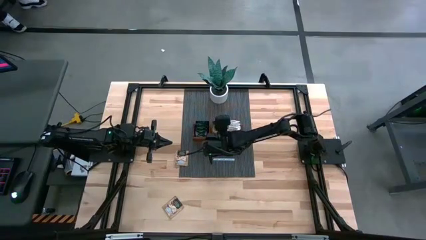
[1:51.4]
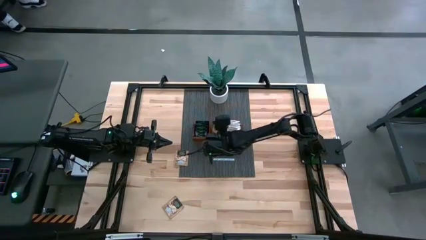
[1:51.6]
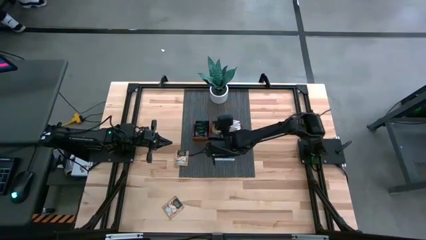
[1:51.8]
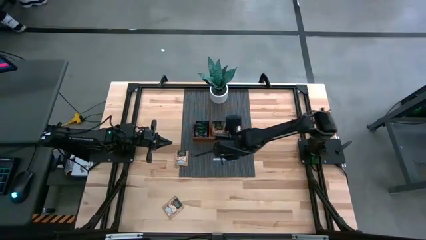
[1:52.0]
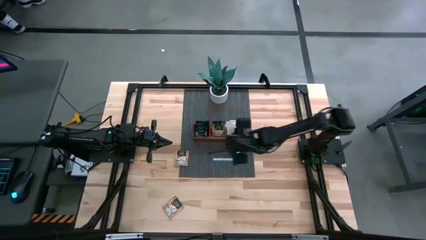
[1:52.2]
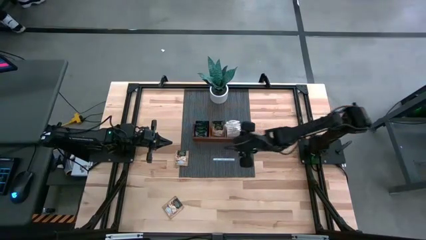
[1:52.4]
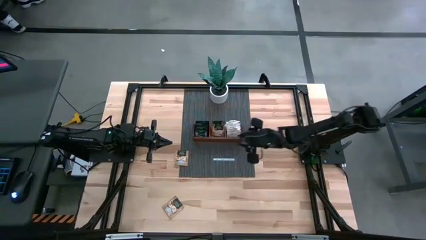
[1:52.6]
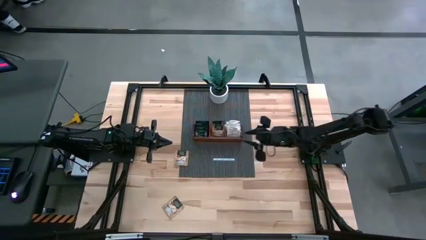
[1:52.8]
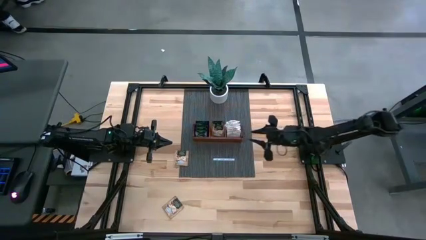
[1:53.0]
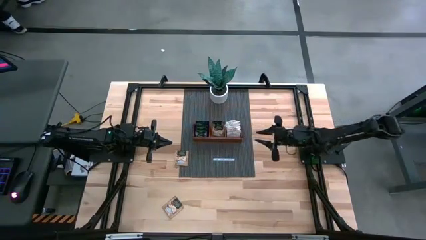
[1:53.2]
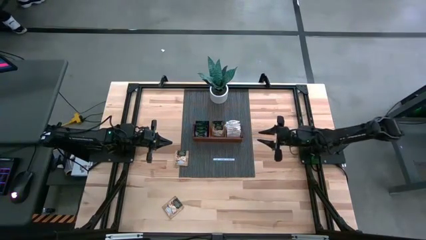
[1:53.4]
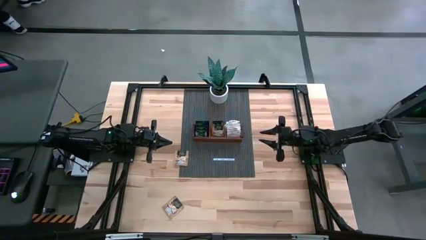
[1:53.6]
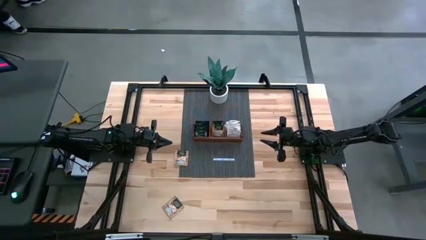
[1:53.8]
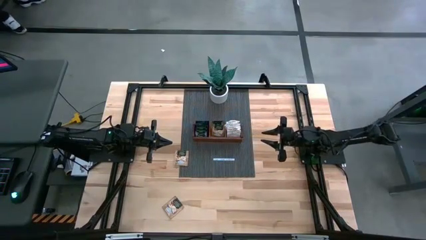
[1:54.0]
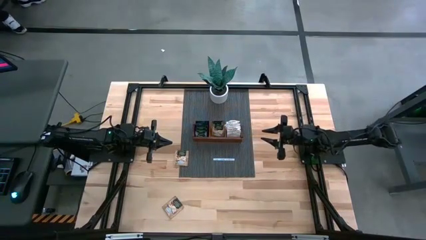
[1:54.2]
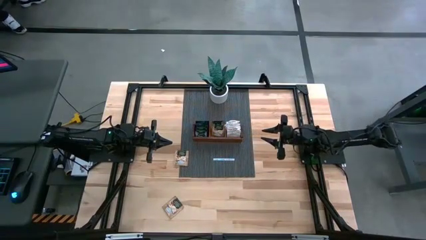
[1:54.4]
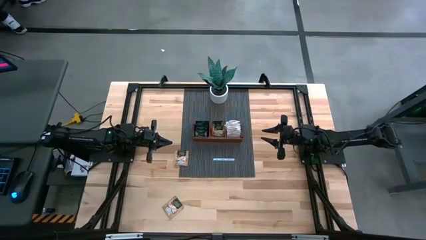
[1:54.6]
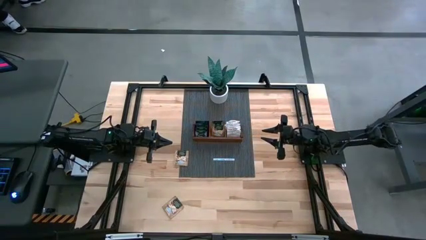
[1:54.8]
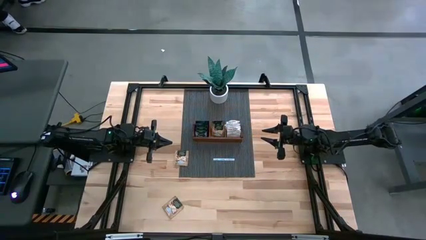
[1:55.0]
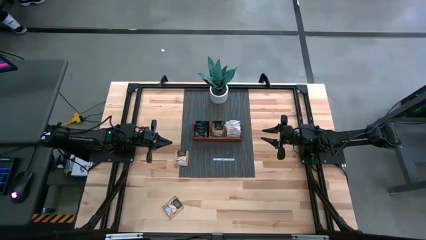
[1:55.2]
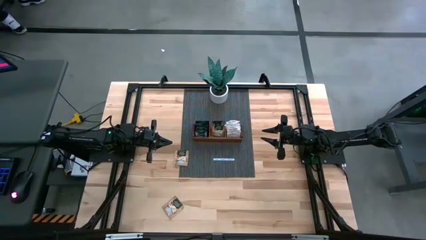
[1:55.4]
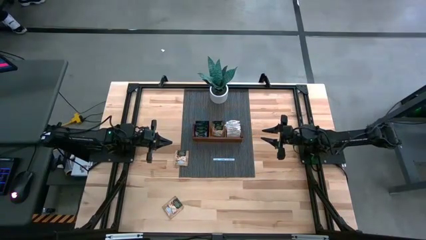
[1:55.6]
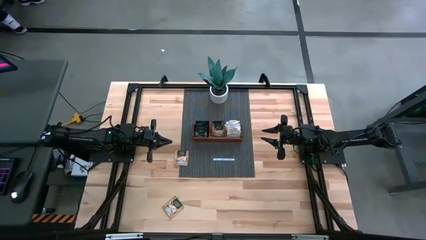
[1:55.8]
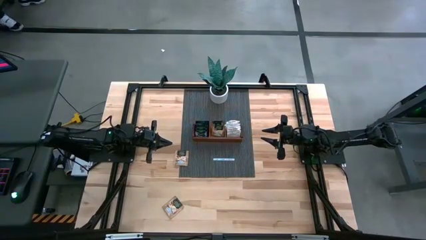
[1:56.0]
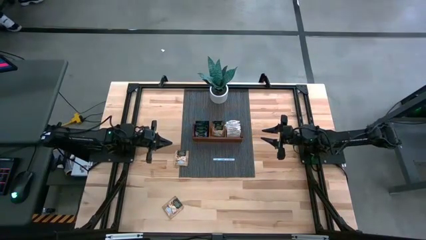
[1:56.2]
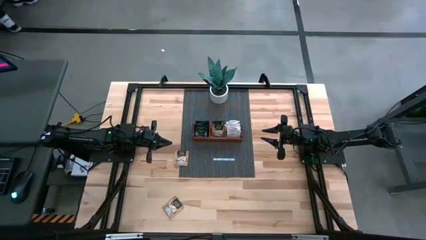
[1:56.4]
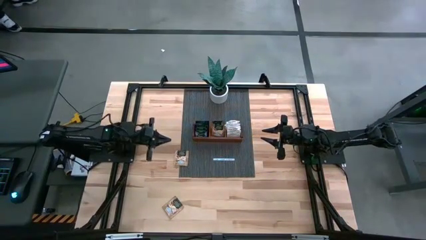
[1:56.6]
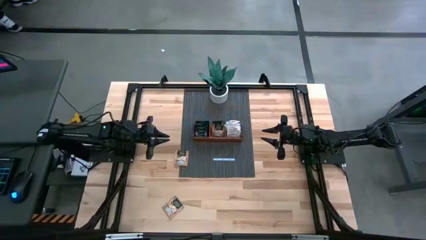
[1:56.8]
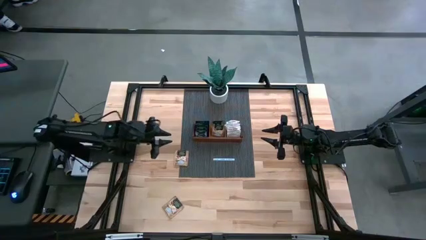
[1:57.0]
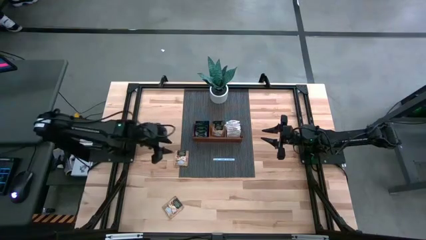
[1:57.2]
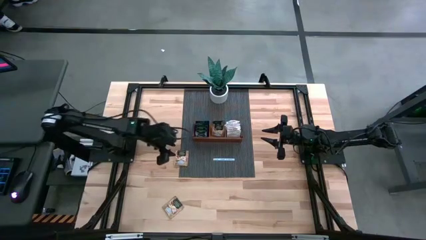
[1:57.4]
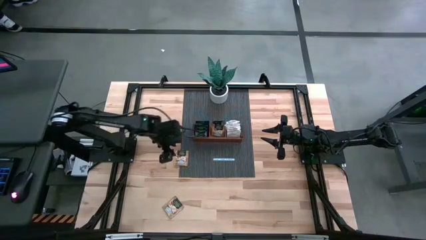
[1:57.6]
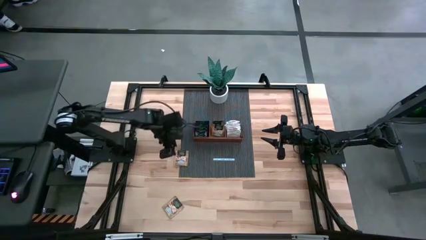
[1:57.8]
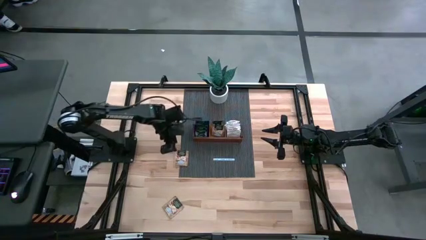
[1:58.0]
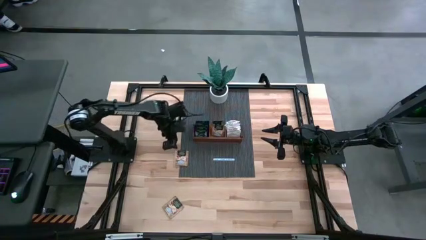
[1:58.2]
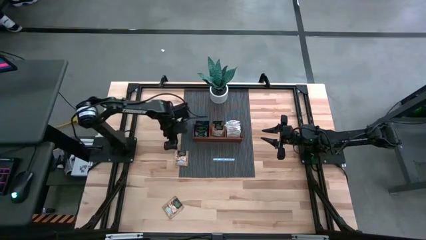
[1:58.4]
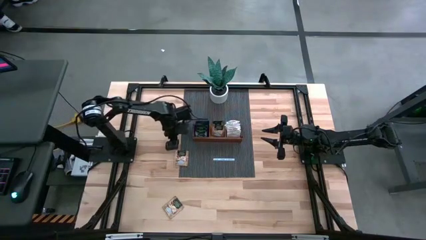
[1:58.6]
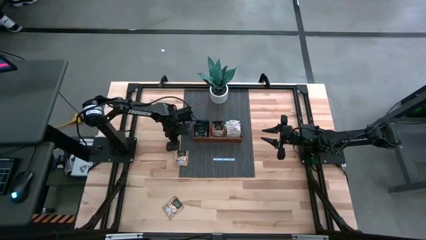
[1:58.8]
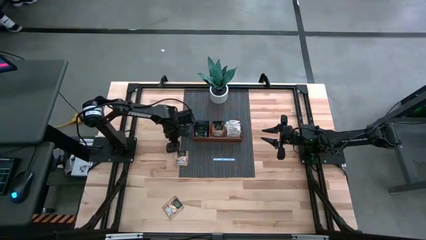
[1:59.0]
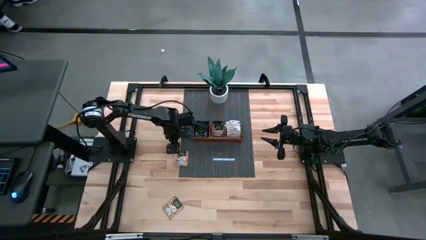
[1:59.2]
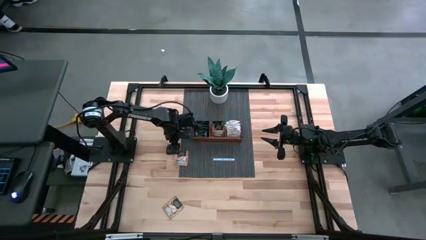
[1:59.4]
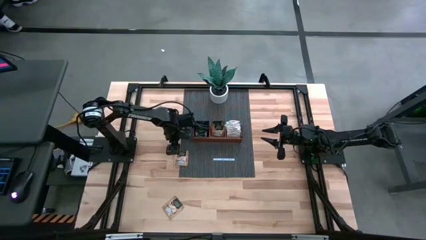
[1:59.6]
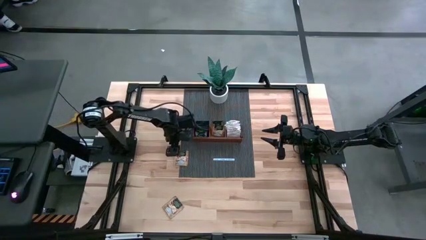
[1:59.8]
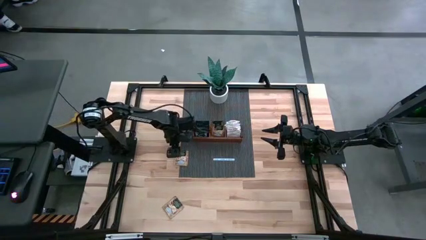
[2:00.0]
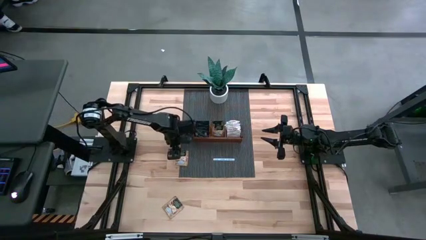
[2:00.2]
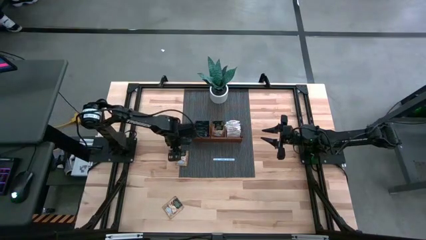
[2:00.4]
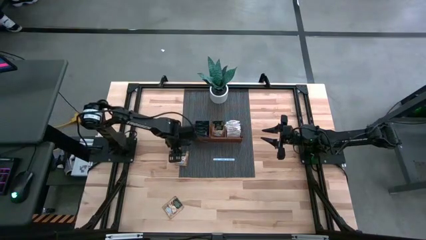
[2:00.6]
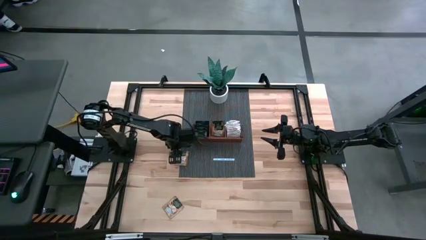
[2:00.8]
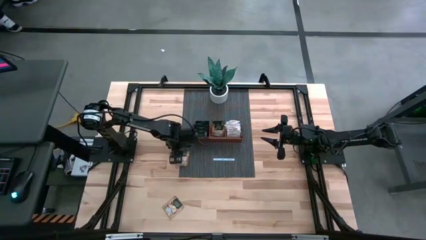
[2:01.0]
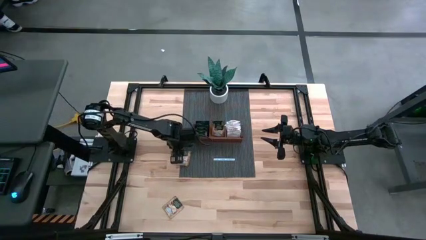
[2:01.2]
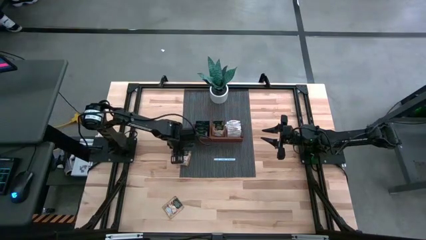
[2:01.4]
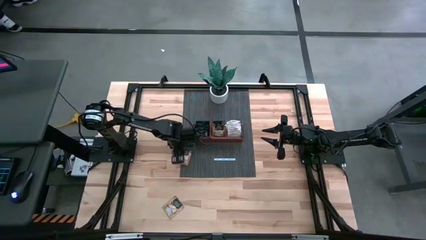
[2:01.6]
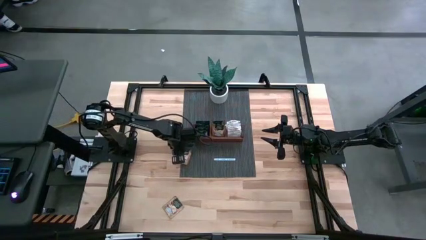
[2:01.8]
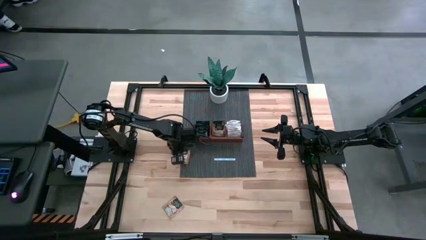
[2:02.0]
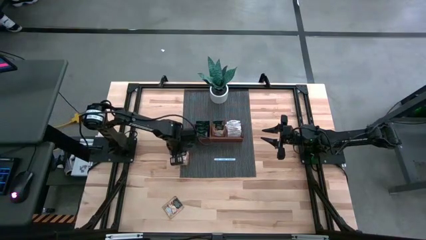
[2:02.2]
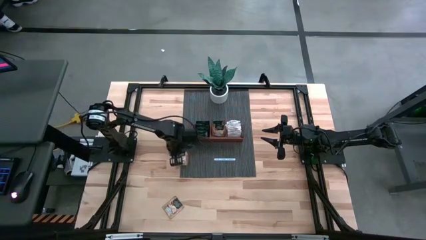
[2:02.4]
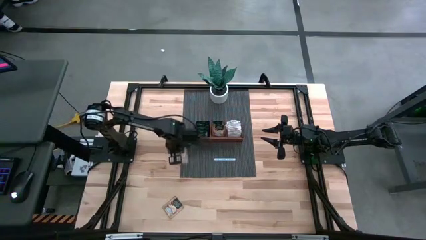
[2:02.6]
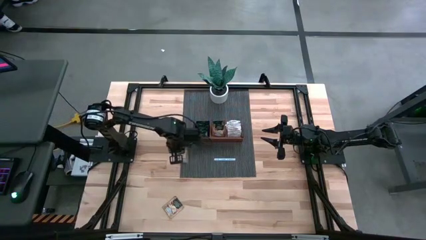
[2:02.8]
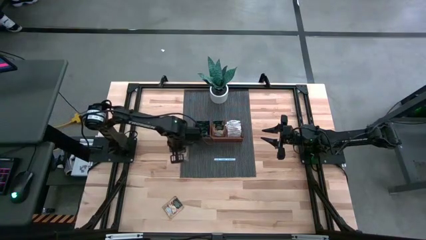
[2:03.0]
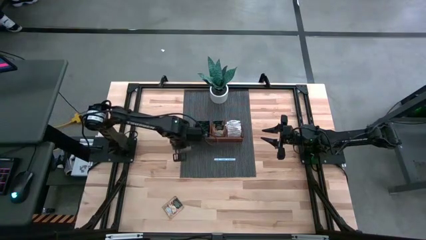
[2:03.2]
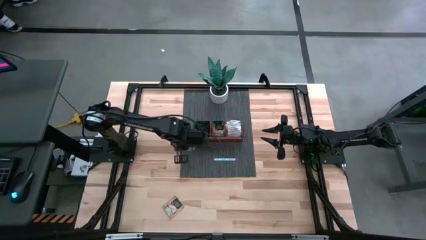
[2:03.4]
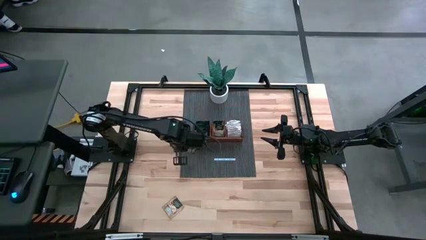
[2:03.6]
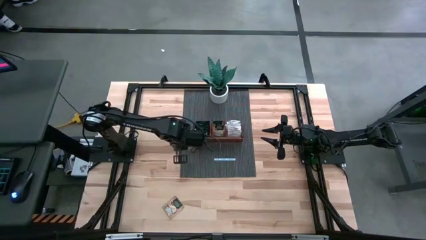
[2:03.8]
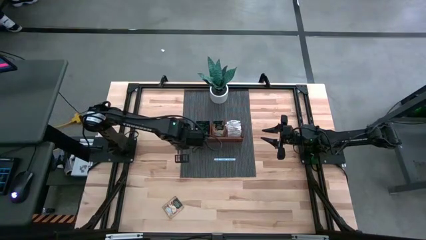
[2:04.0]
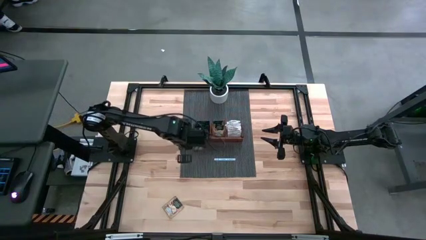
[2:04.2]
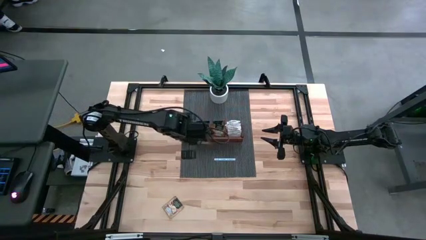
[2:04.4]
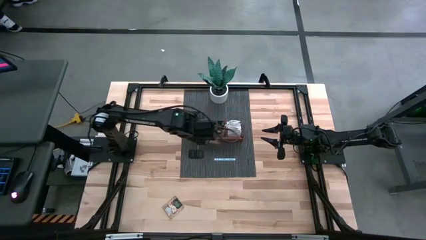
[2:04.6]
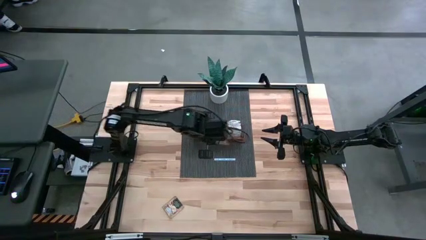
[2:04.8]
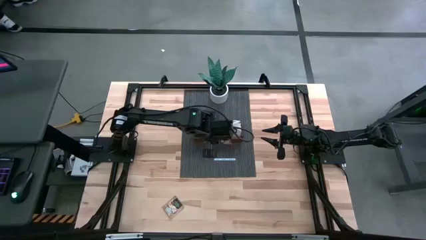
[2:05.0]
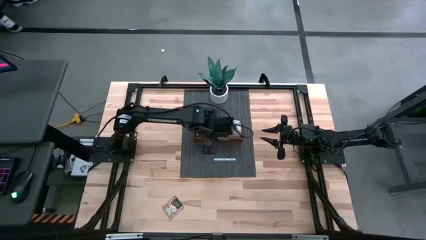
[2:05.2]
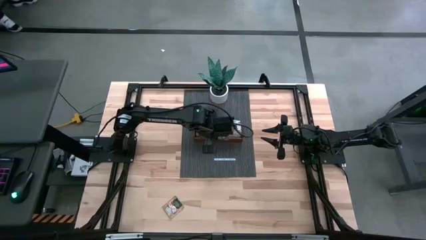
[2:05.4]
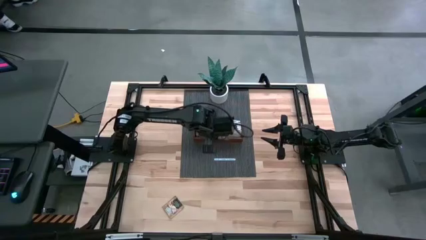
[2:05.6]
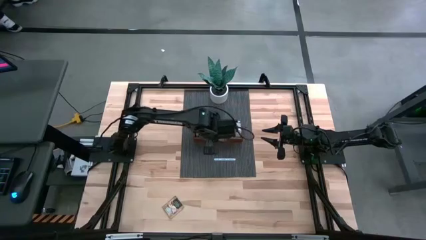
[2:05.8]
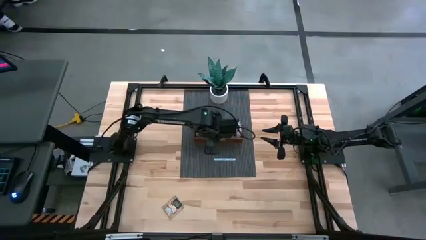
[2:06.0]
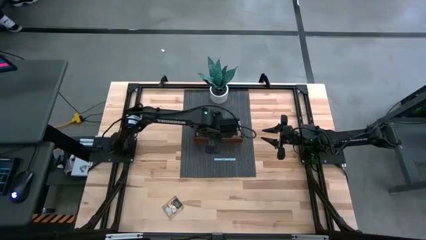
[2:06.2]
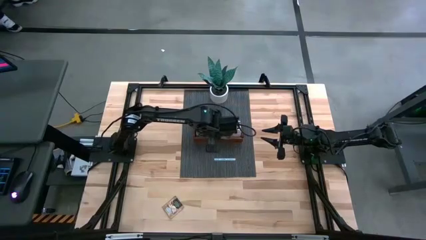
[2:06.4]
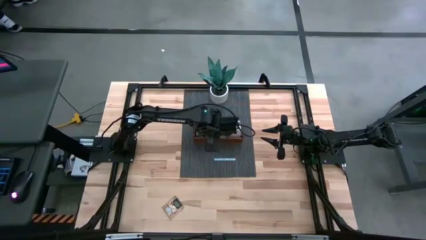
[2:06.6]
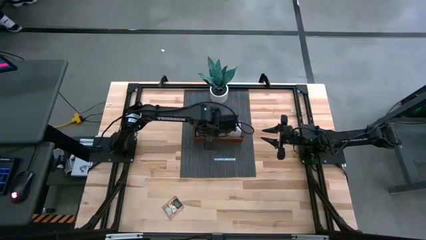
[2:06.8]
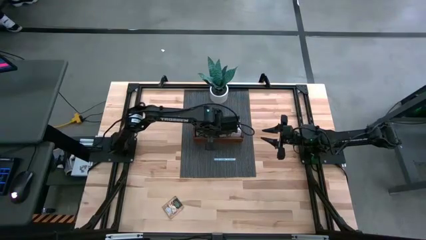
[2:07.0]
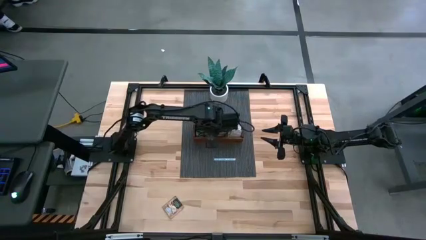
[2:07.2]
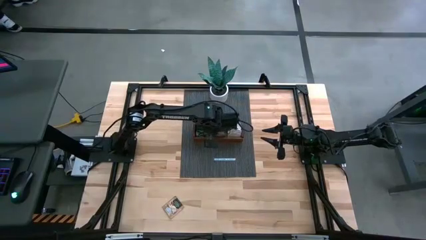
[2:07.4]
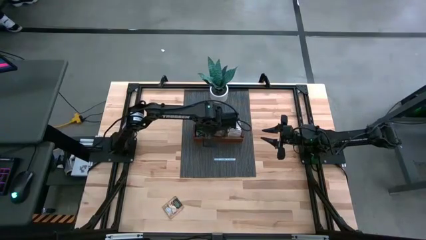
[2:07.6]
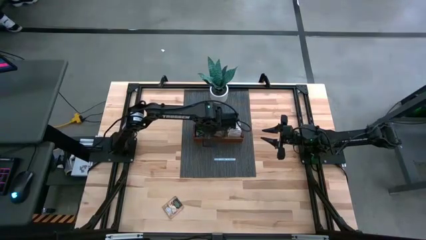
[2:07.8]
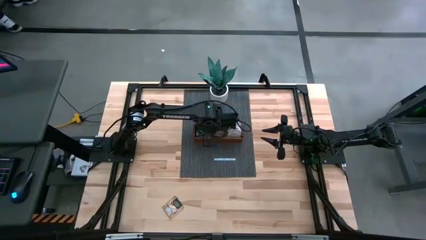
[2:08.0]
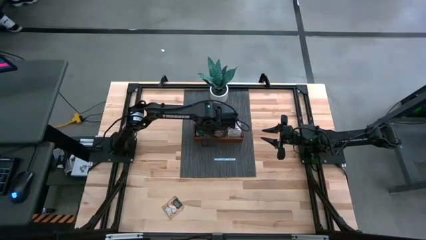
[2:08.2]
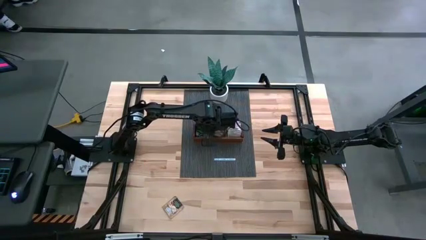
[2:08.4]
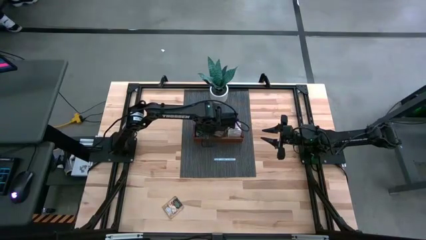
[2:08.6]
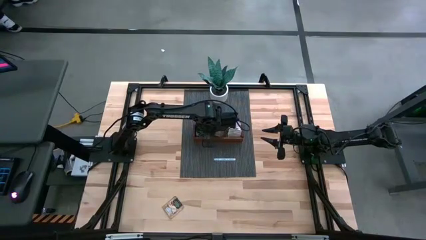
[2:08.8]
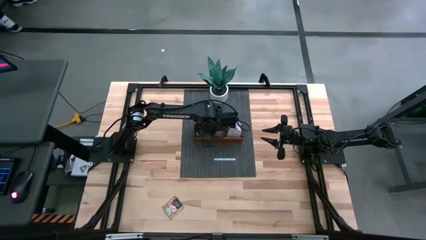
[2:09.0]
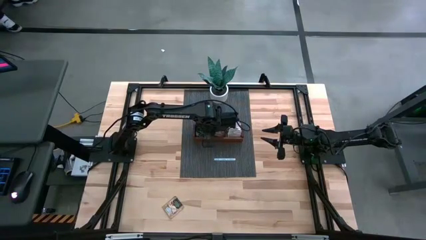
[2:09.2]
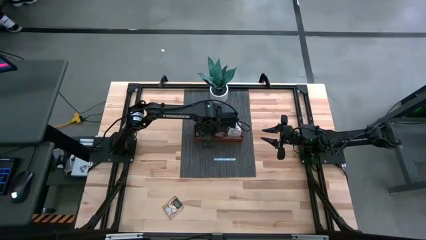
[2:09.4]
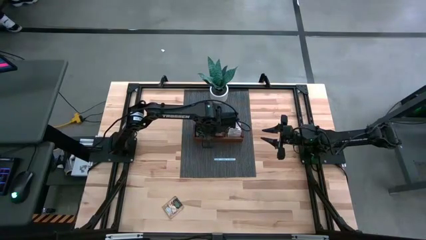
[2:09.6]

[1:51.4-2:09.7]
Task: Pick & Place Tea
Put the brown tea bag into the middle section of the wooden organizer
